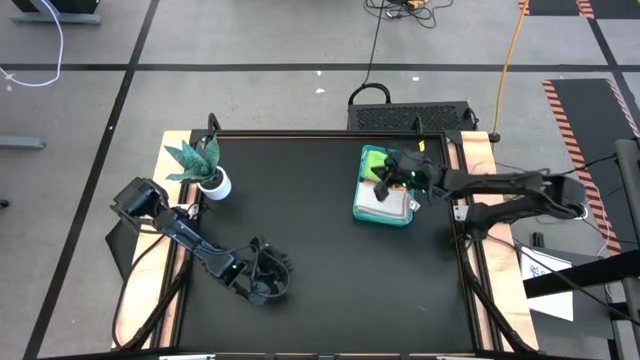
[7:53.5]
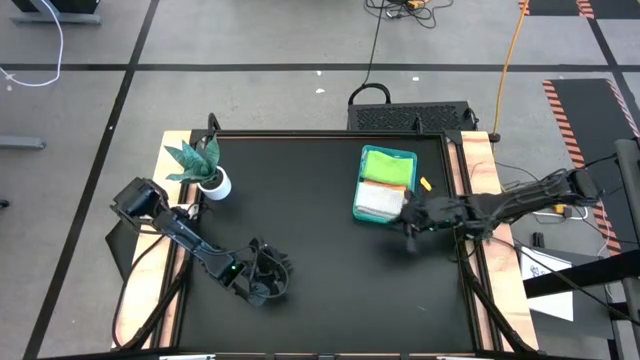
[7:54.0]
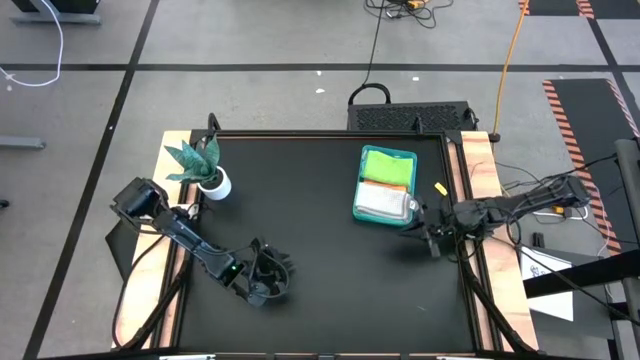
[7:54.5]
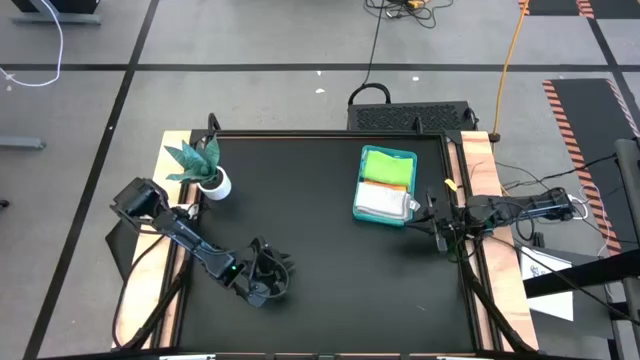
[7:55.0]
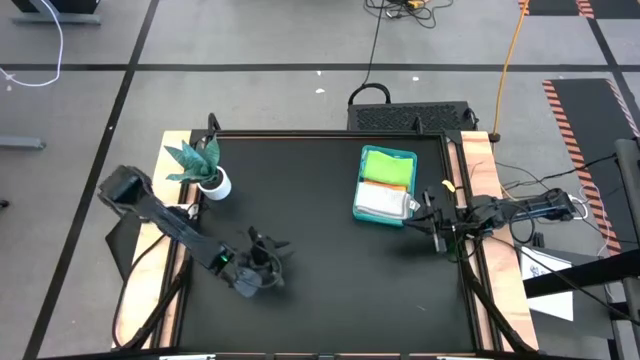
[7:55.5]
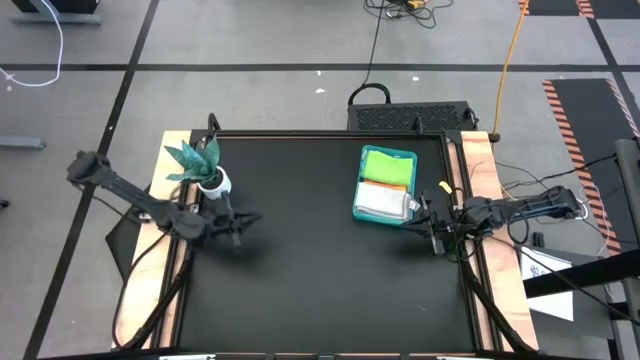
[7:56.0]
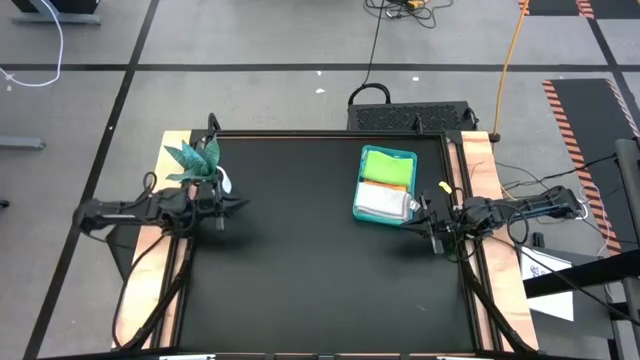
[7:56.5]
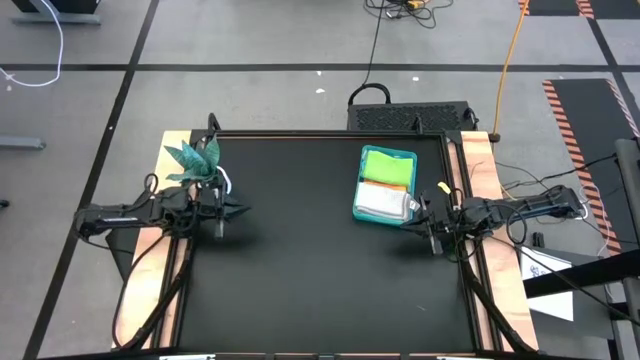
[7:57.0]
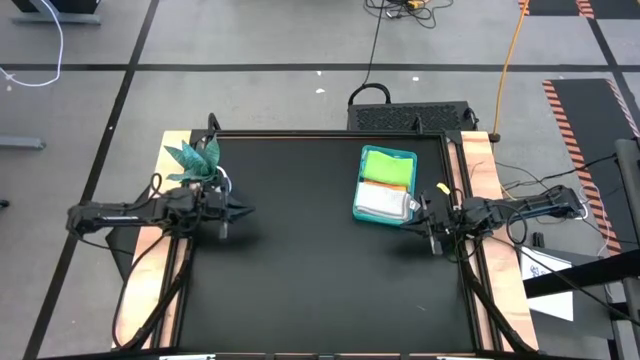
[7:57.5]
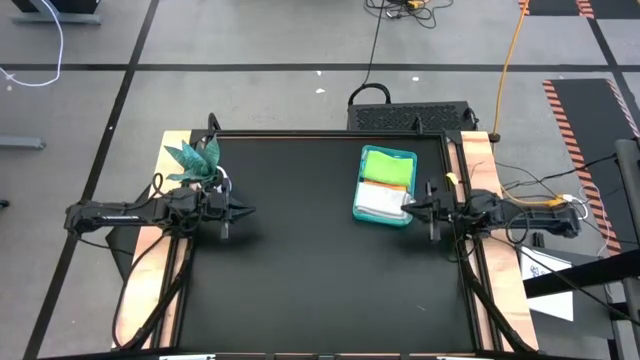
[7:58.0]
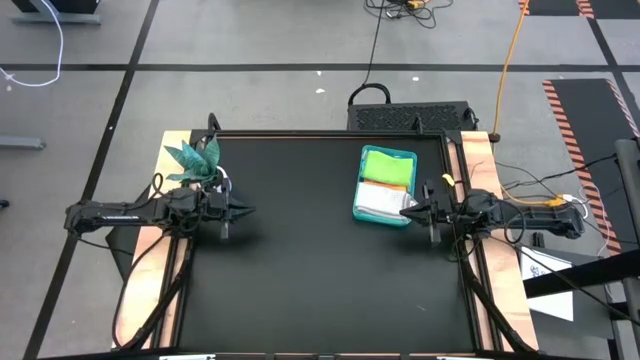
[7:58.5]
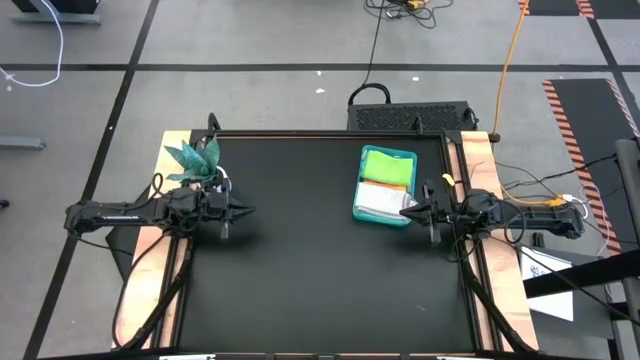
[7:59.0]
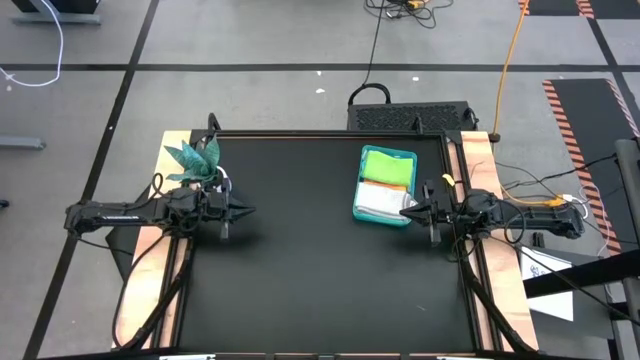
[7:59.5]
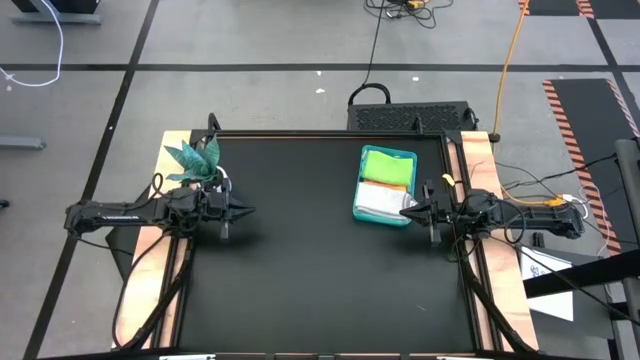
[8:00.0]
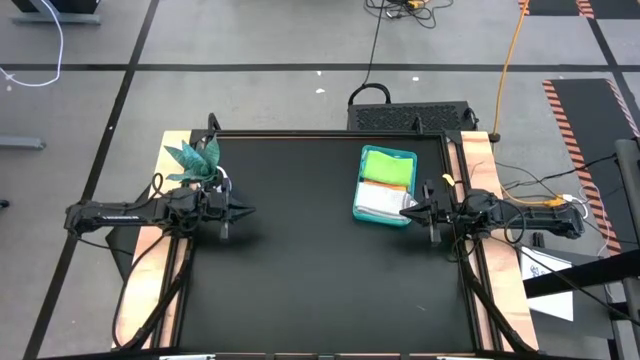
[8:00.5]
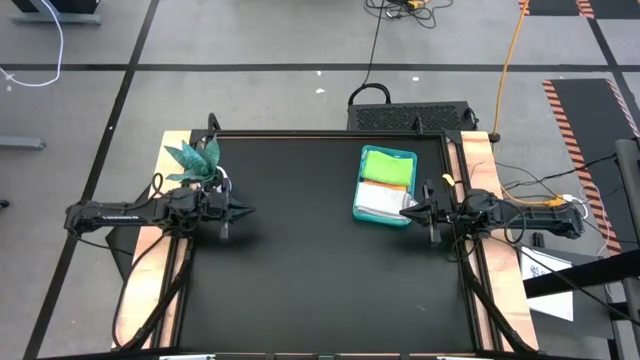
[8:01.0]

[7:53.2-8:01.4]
Task: Fold microfiber towels
Return to Home Position

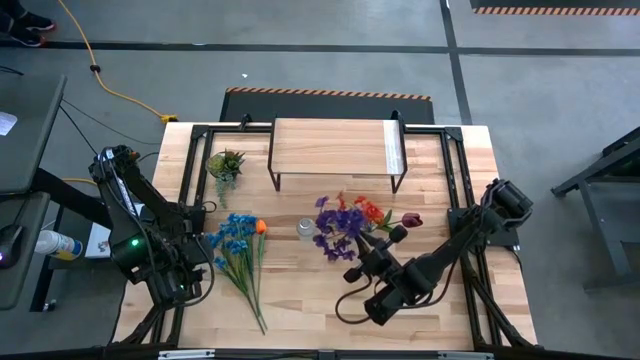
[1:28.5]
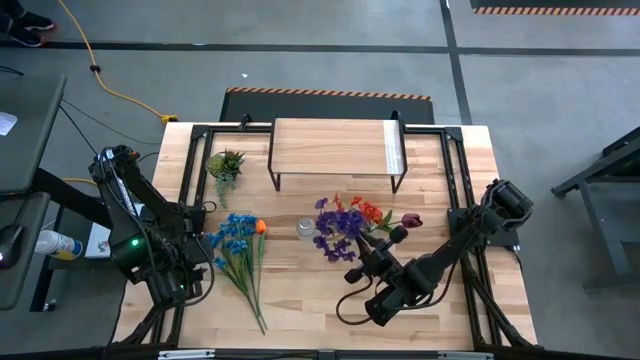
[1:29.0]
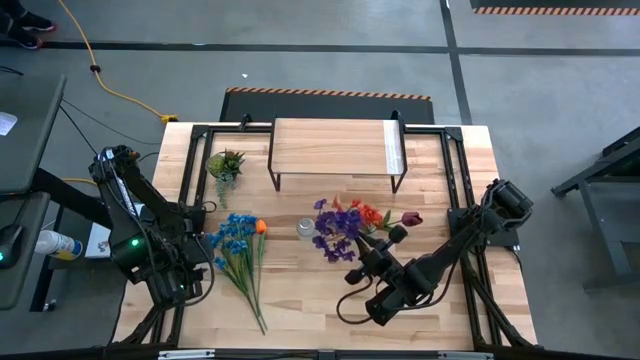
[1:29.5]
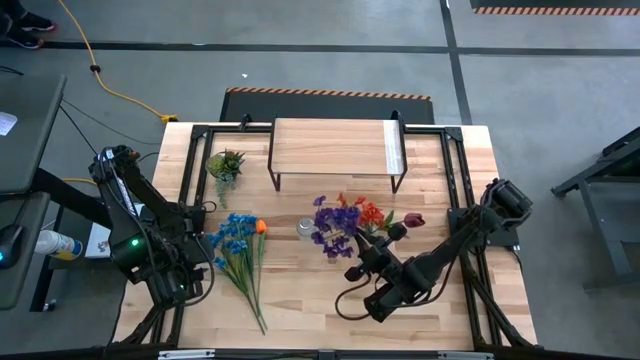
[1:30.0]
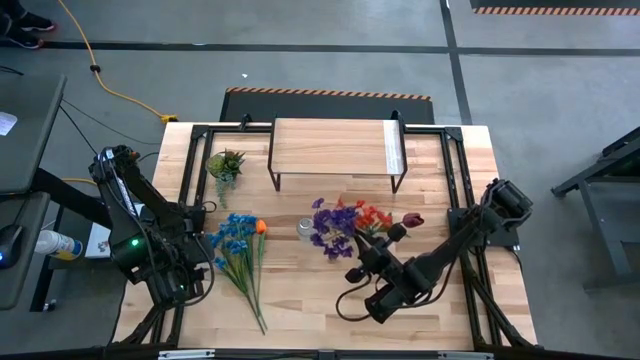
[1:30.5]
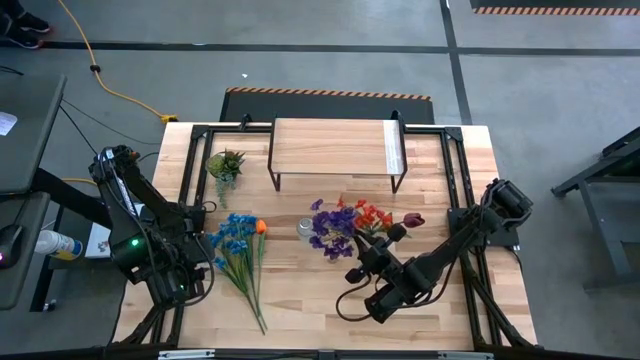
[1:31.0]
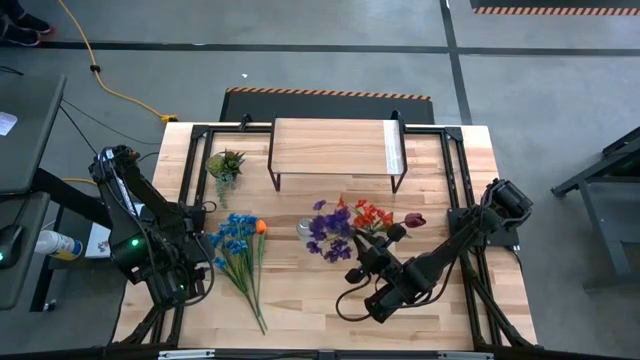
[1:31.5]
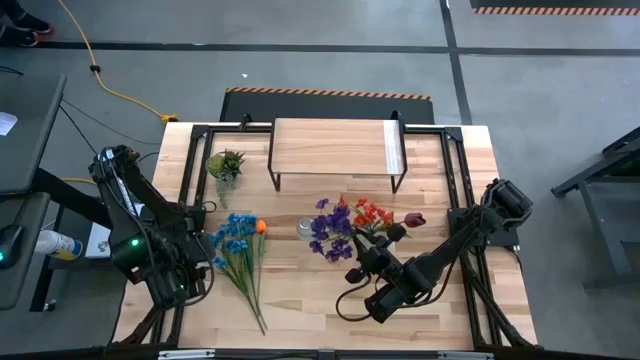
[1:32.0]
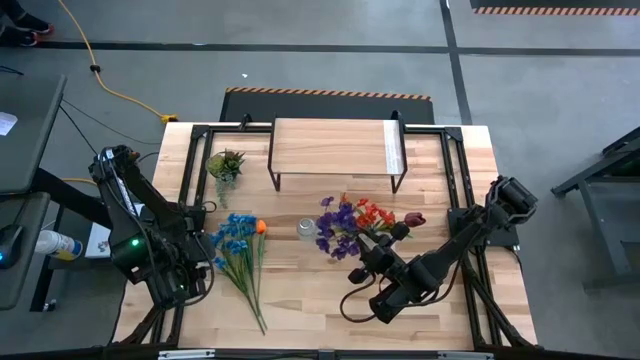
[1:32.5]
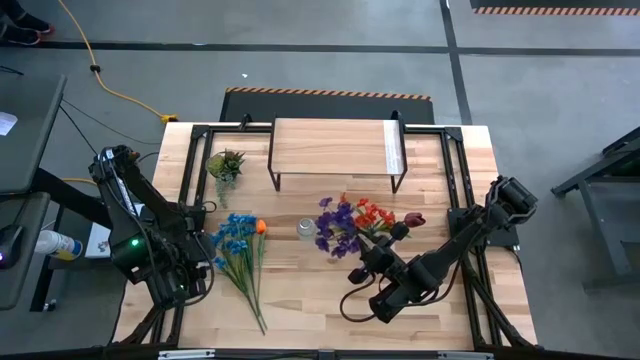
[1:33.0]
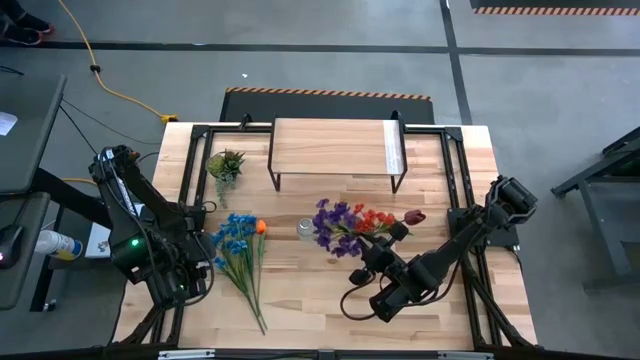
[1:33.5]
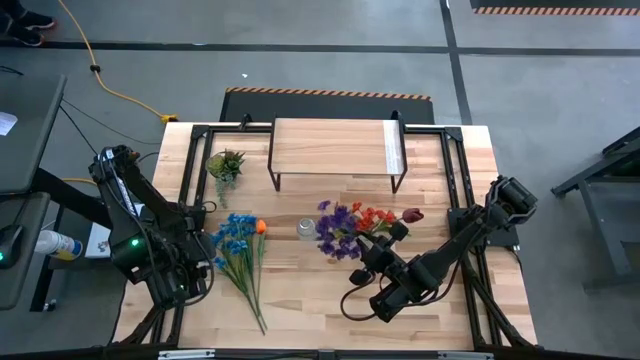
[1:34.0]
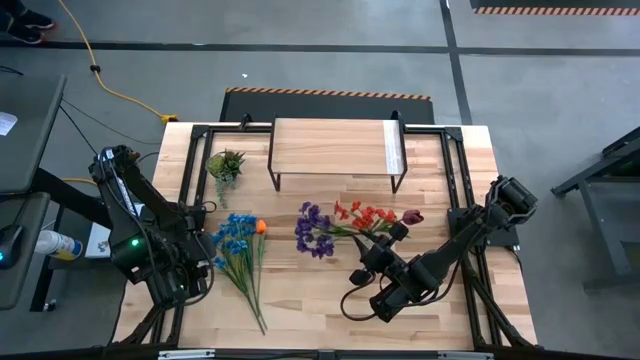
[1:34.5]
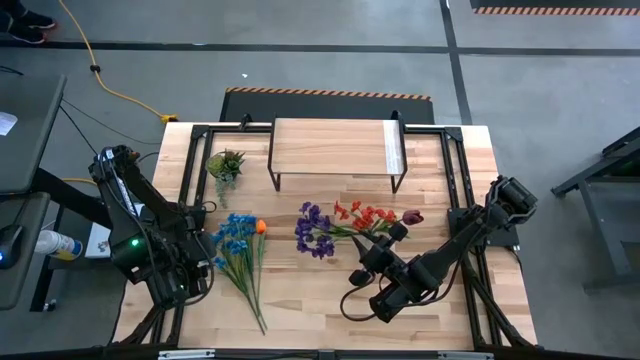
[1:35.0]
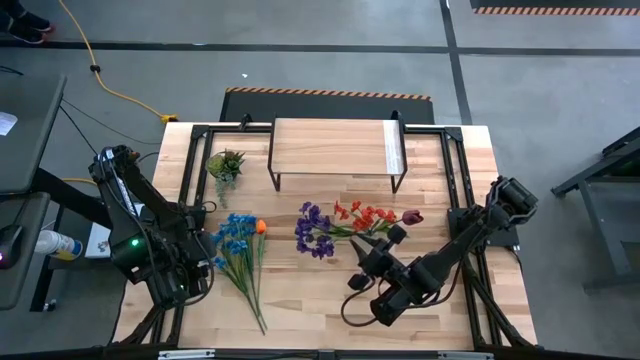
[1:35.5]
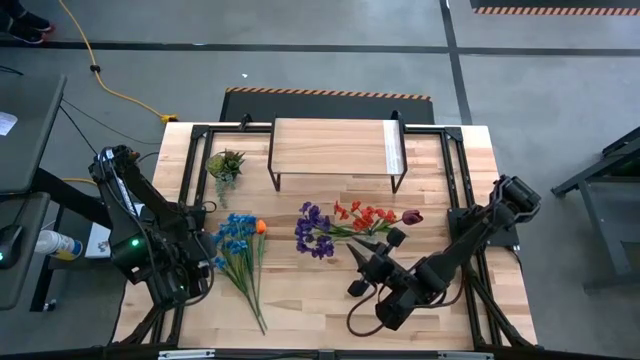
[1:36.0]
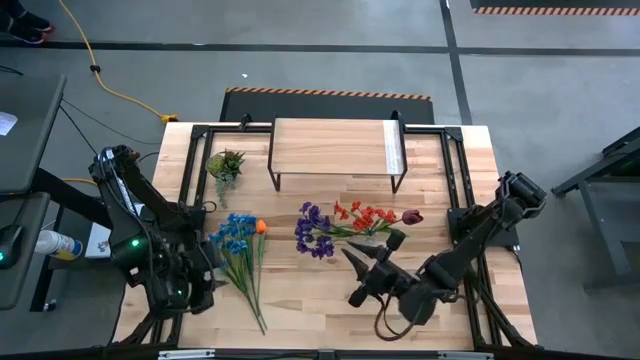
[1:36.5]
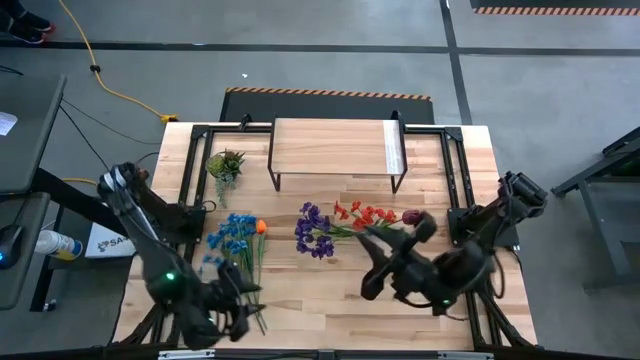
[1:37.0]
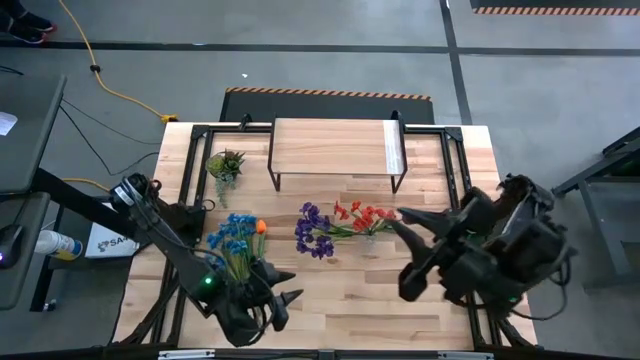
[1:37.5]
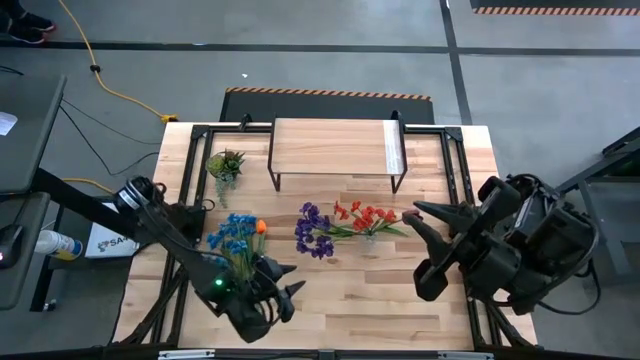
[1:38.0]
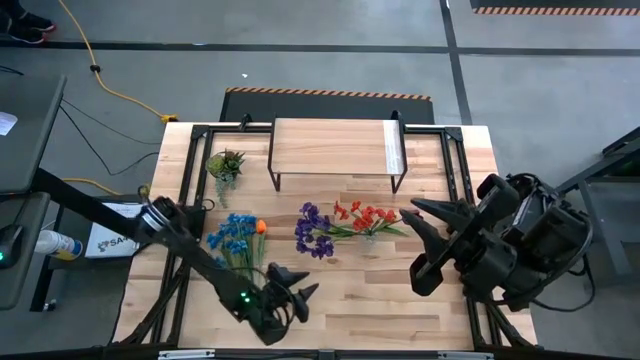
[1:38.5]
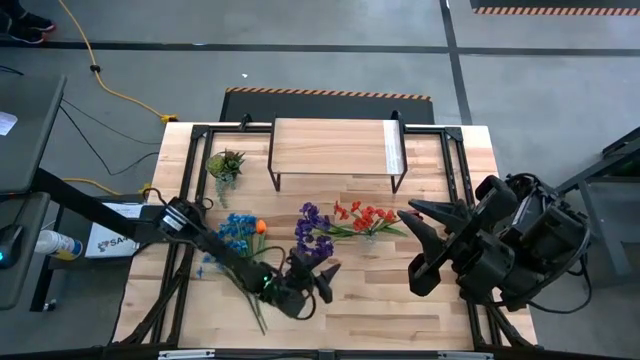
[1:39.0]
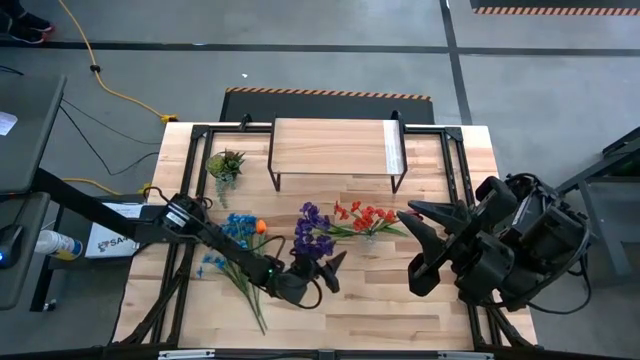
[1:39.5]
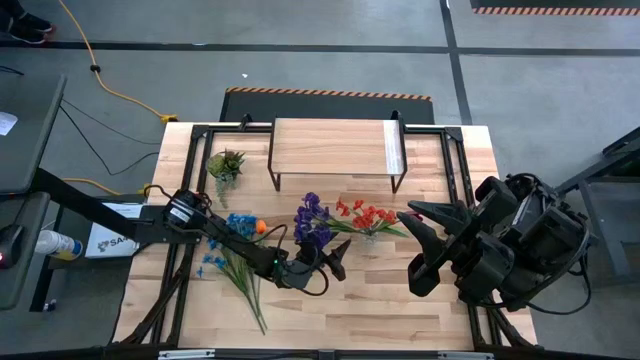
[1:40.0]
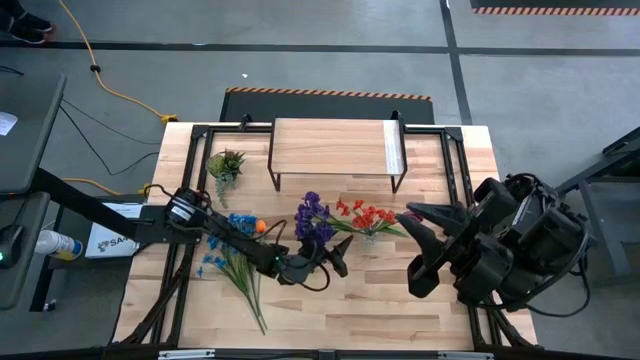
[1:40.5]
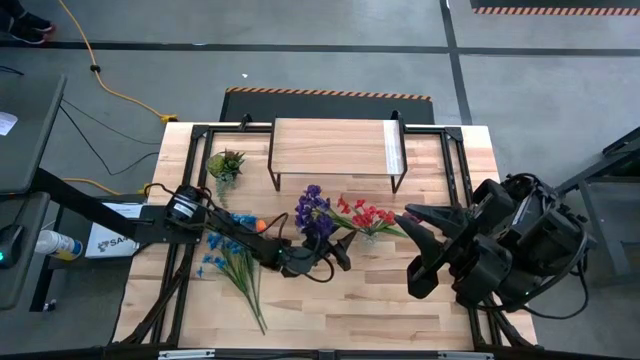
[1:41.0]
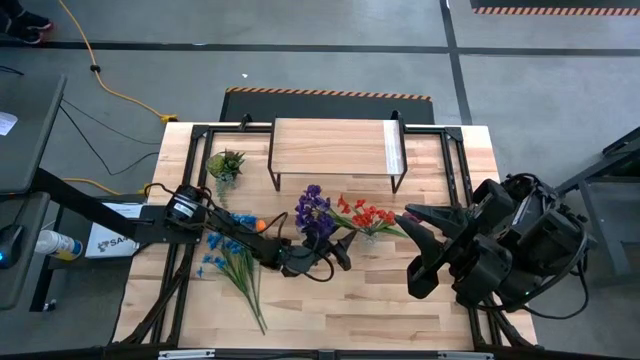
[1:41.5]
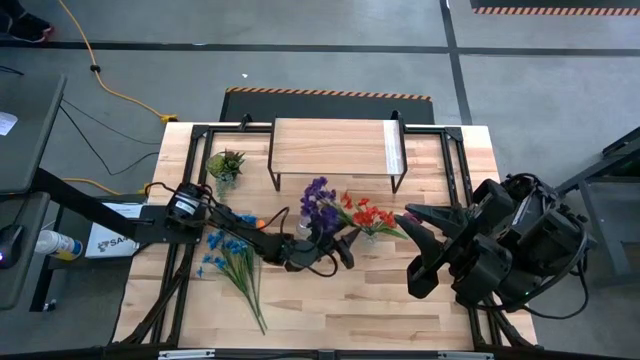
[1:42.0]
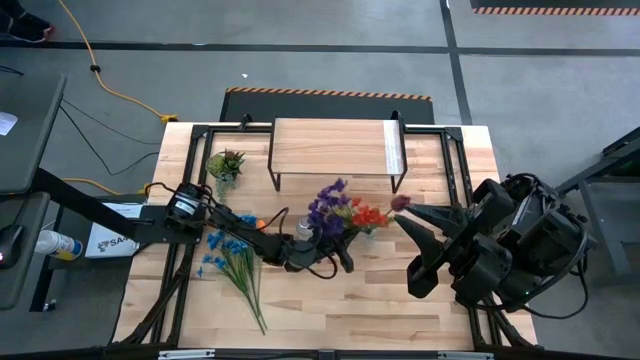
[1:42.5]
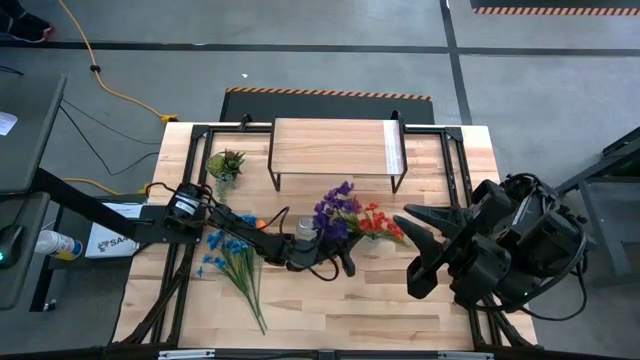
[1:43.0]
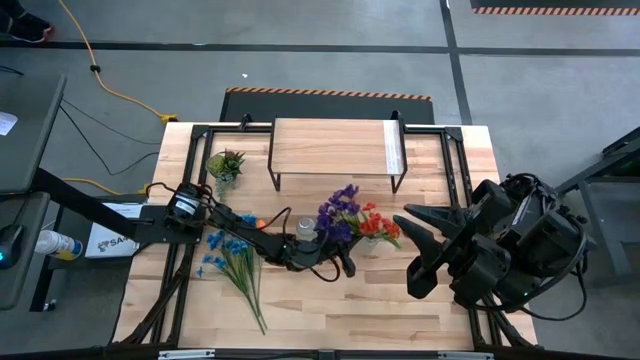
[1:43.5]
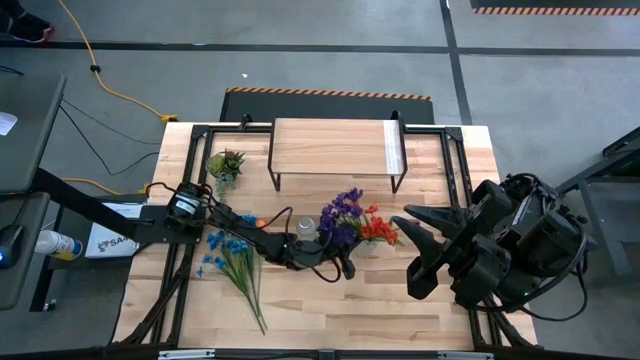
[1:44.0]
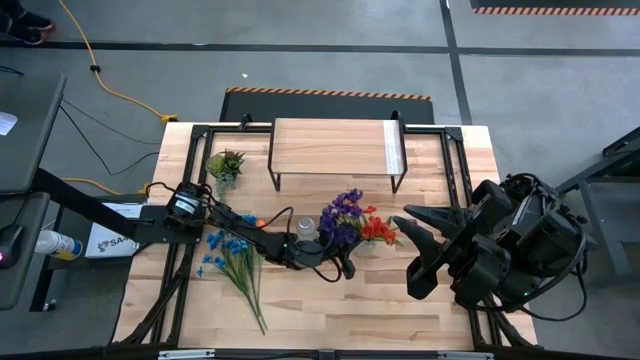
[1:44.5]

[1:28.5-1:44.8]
Task: Pick and place flowers into a vace then onto a shelf
Put the purple flowers into the right transparent flower vase
